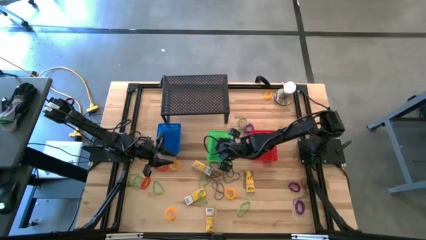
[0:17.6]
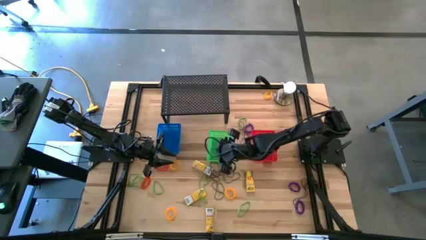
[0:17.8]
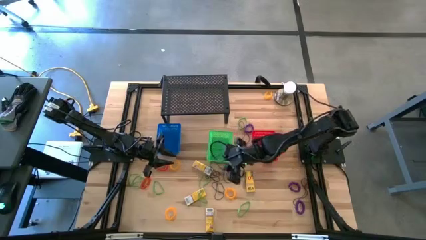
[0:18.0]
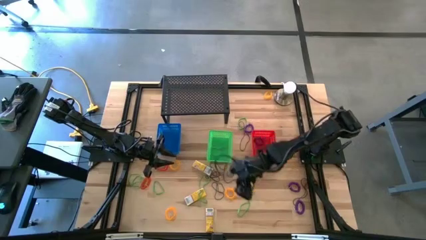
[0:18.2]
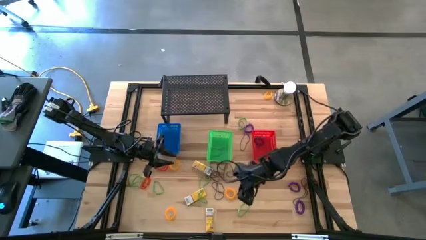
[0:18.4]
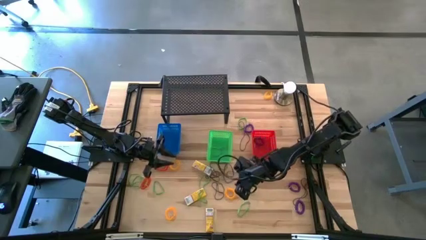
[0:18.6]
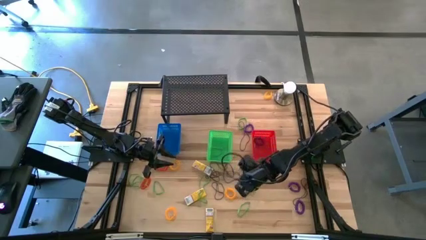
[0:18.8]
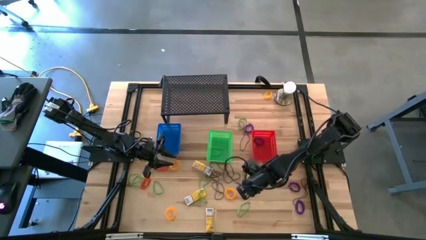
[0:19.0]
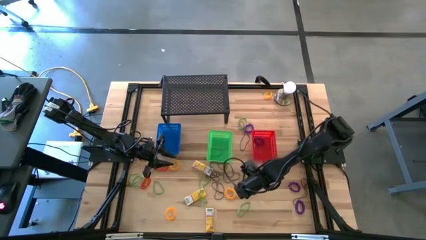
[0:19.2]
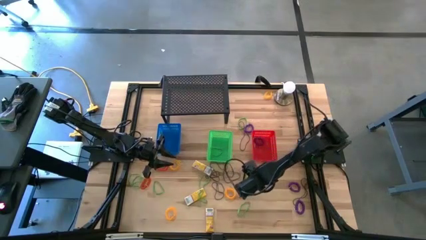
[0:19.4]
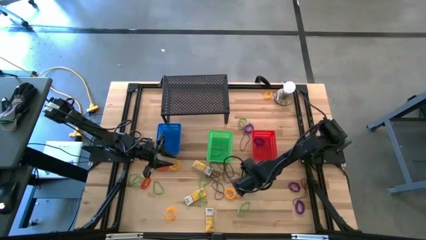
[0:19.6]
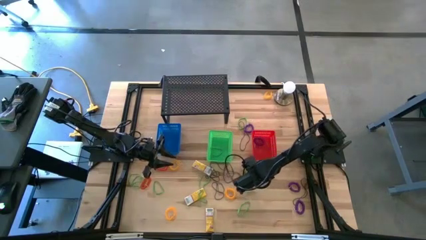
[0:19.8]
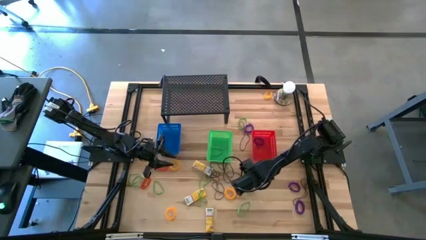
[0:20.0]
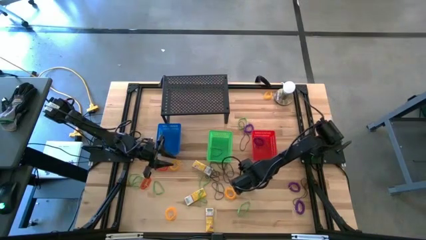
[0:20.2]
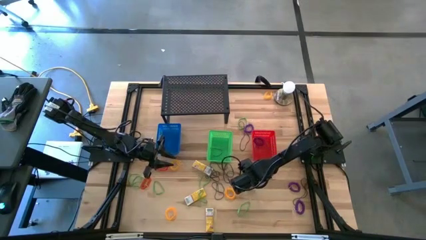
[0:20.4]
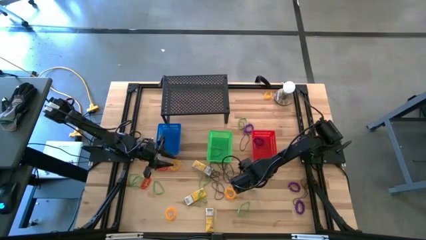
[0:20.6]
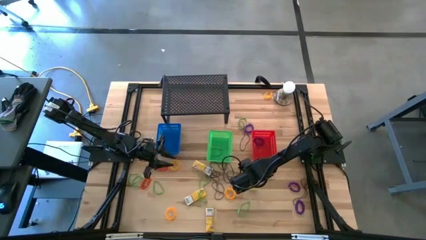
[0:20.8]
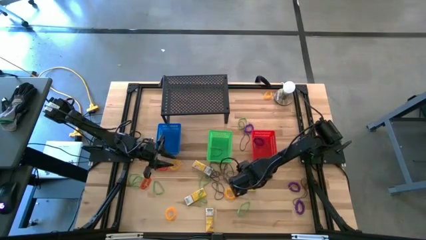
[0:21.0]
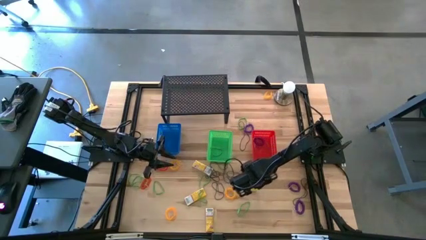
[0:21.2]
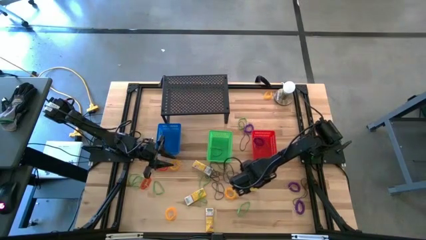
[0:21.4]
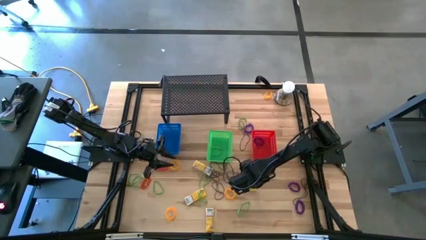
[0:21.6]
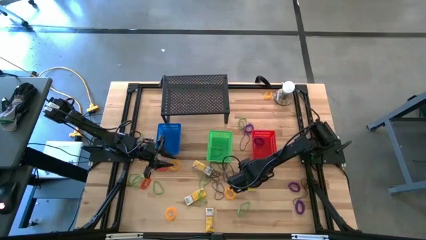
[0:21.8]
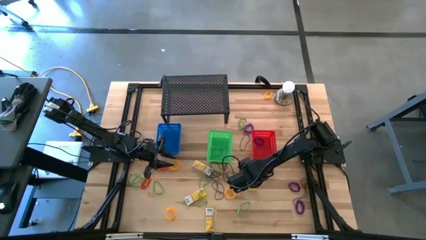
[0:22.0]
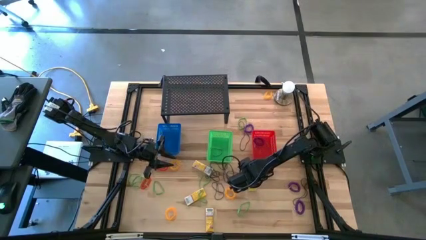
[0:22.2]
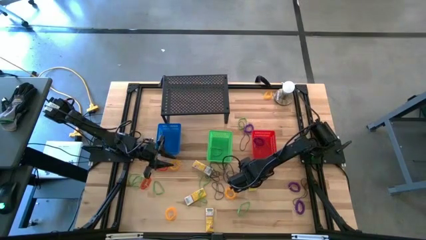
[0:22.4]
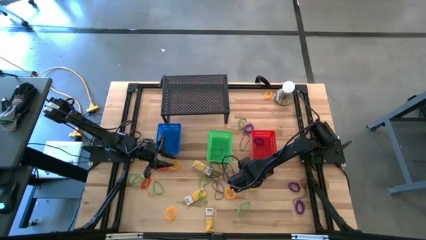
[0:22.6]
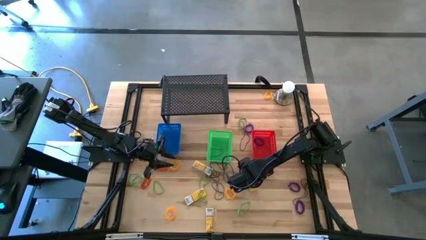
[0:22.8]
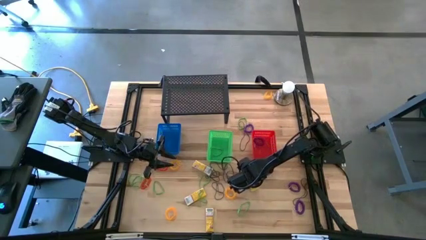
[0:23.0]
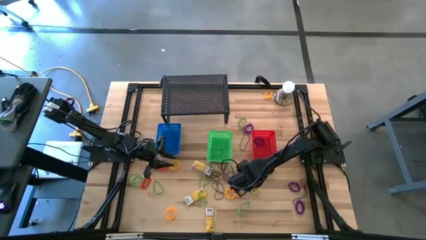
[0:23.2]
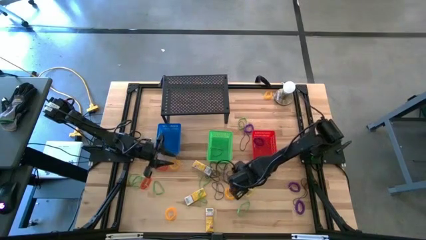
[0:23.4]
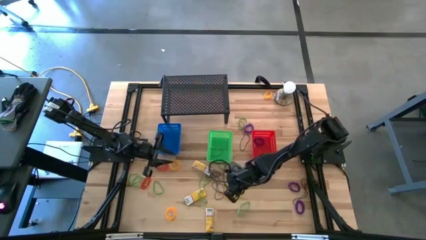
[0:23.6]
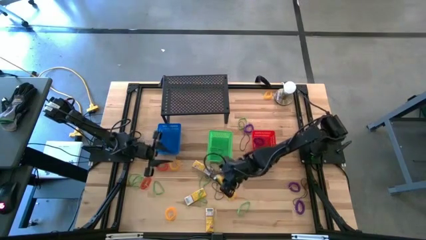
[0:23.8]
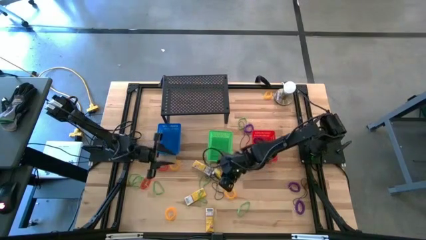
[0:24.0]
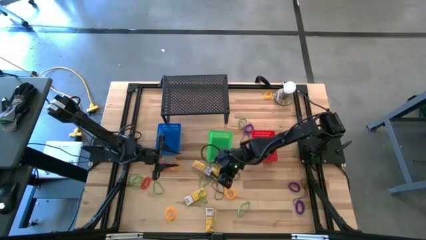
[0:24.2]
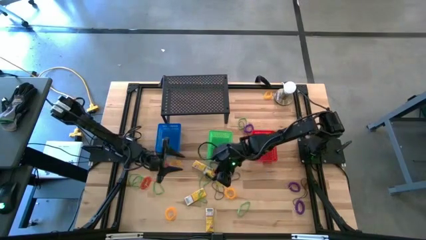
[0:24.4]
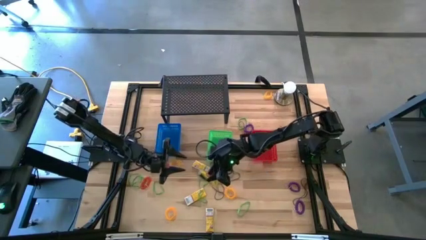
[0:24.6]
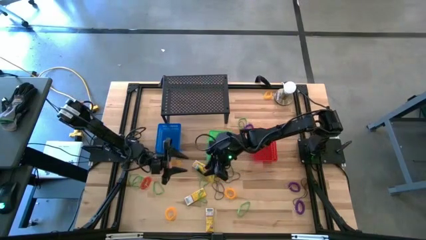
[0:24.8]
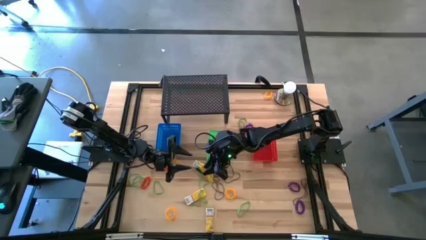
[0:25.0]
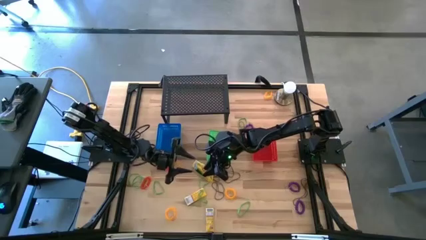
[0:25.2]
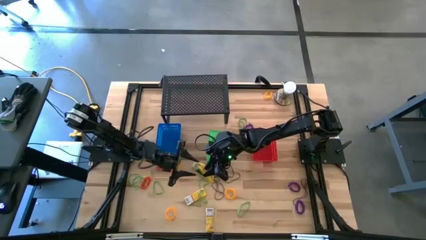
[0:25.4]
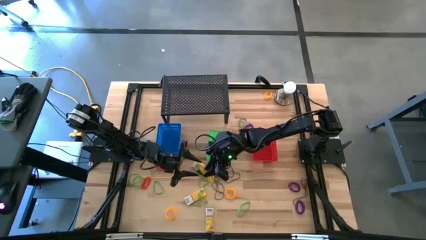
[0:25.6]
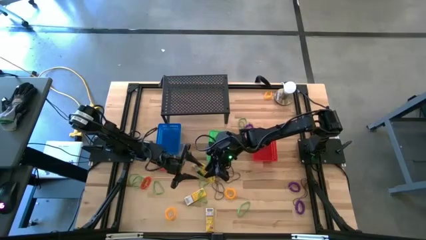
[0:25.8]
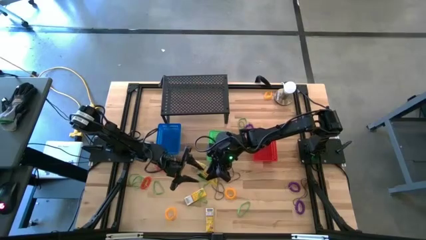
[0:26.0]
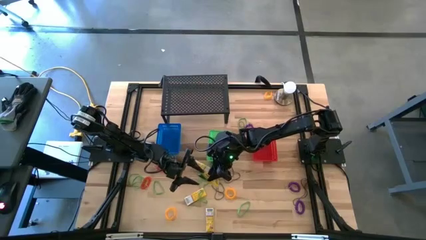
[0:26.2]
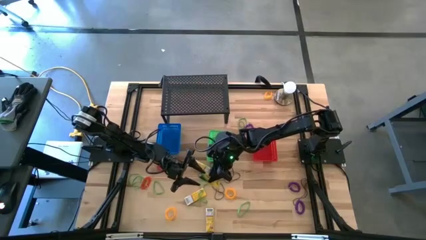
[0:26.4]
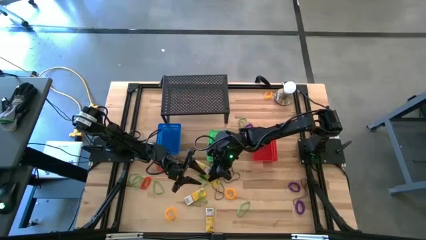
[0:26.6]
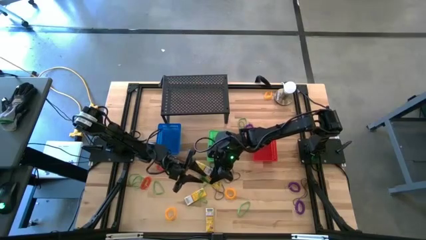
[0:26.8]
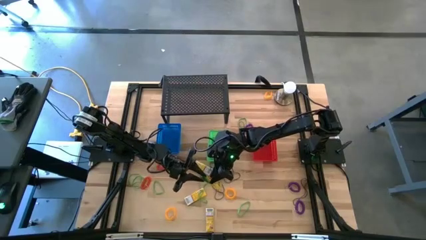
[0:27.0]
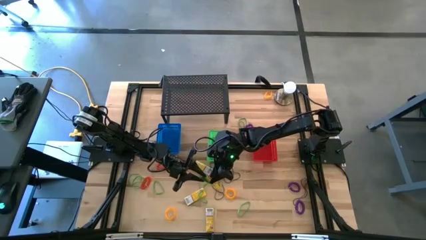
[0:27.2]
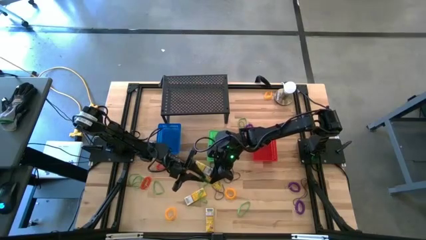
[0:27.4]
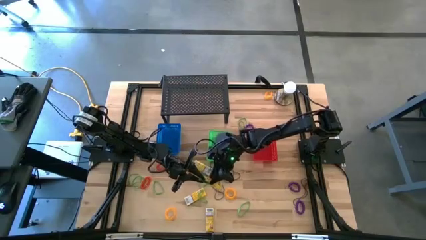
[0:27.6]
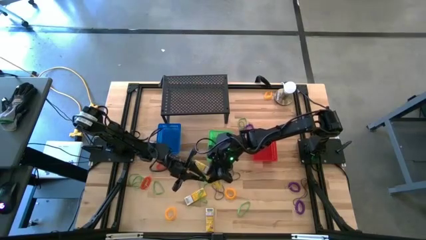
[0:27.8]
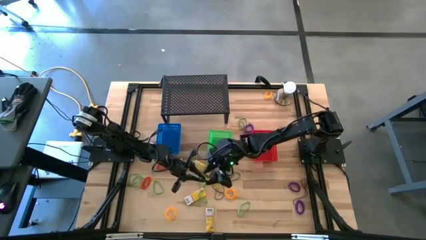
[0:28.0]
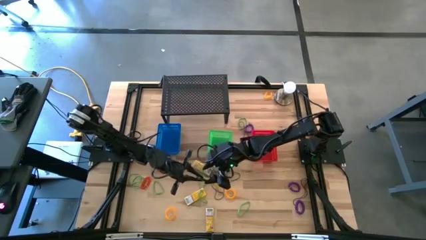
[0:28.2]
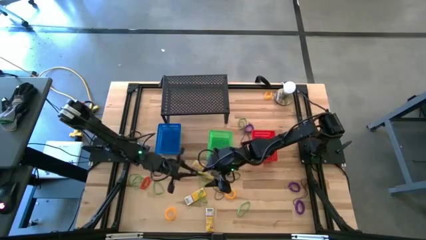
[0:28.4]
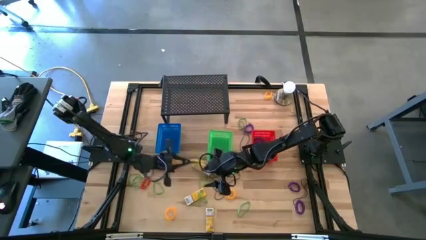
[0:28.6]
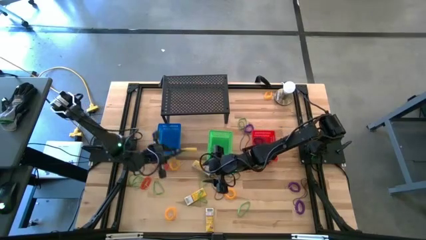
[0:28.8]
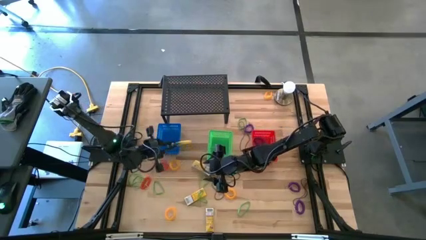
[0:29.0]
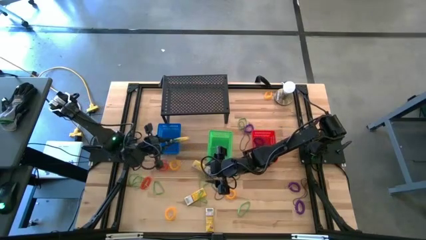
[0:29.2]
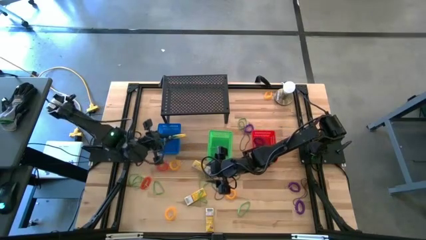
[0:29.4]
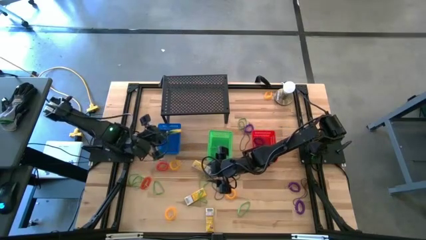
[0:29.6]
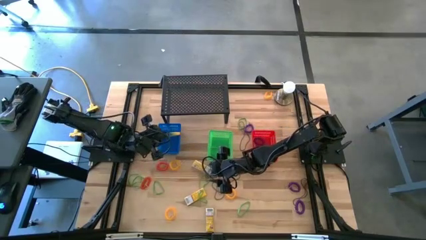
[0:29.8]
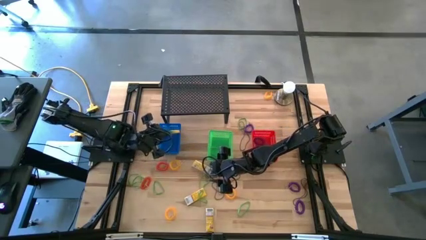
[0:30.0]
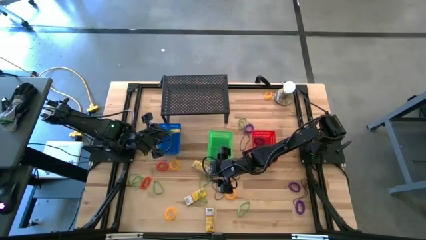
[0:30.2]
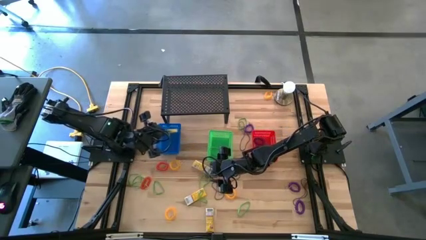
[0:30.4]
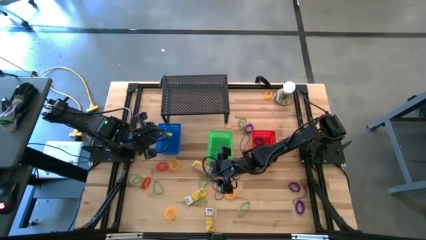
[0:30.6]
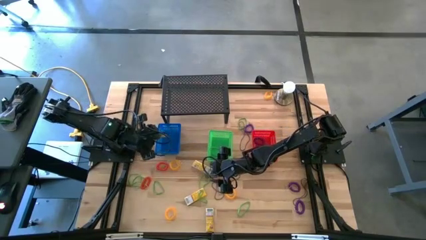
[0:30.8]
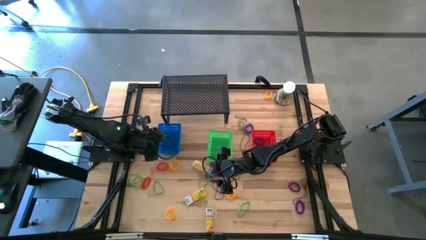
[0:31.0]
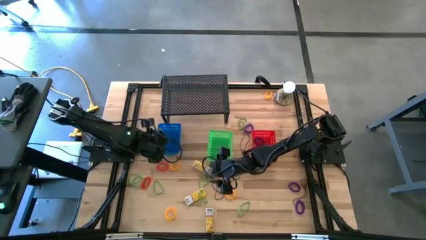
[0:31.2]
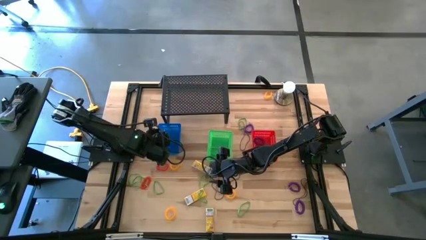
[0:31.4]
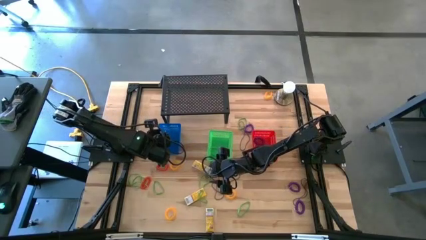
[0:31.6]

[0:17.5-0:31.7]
Task: Pick & Place Office Desk Supplies
Put the crayon box into the blue bin

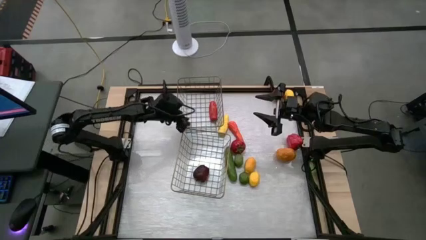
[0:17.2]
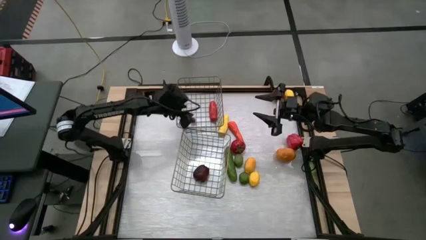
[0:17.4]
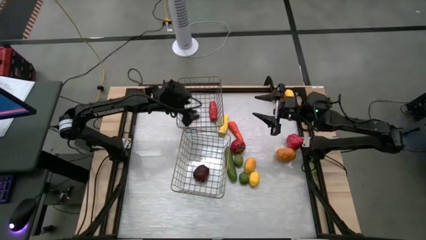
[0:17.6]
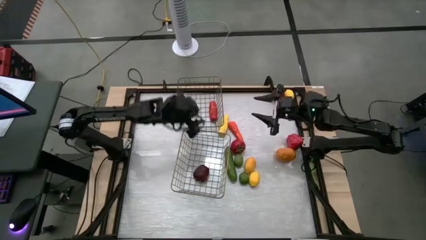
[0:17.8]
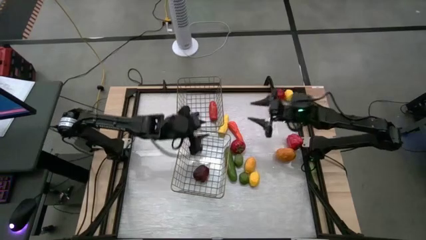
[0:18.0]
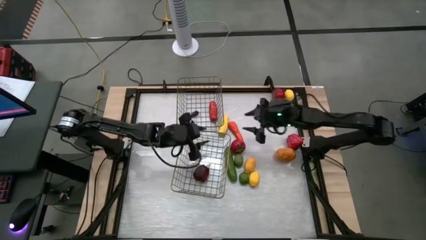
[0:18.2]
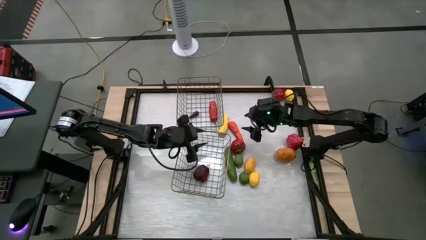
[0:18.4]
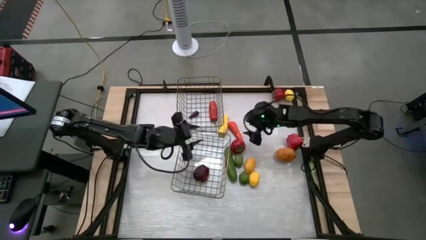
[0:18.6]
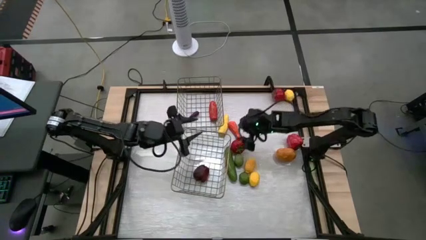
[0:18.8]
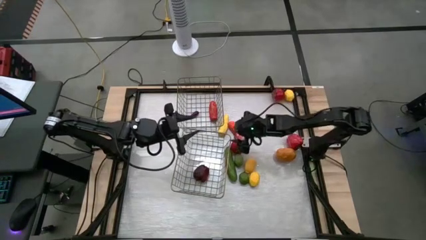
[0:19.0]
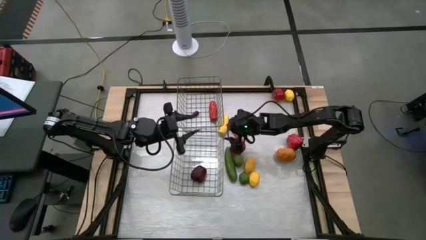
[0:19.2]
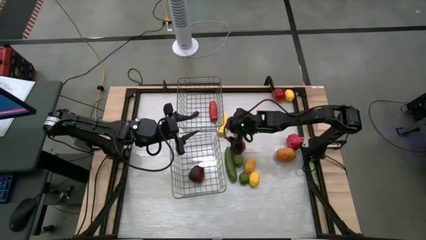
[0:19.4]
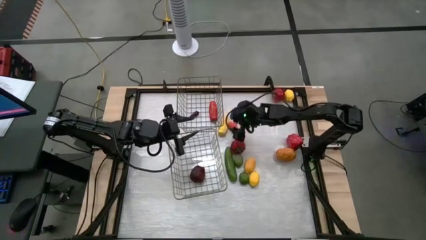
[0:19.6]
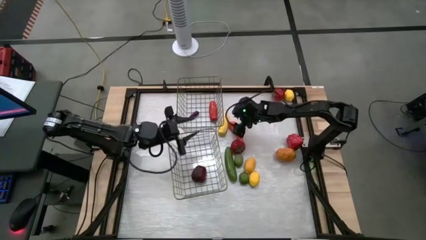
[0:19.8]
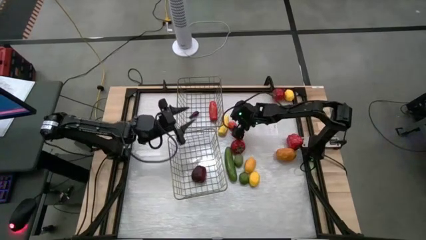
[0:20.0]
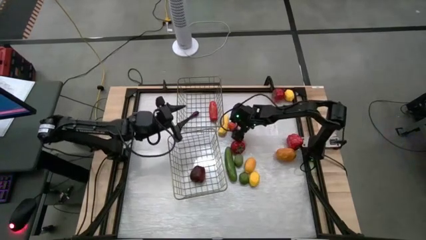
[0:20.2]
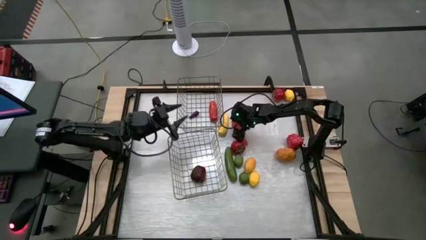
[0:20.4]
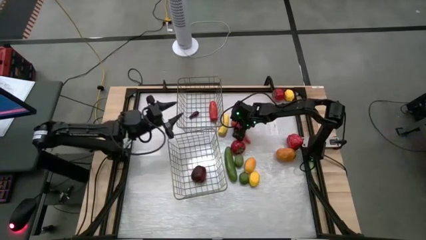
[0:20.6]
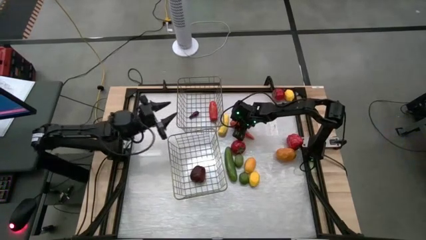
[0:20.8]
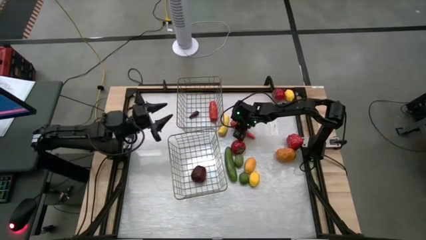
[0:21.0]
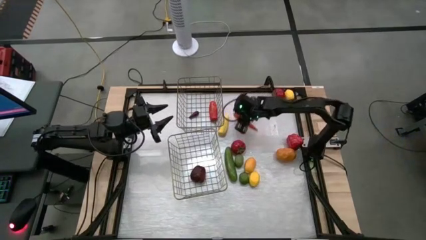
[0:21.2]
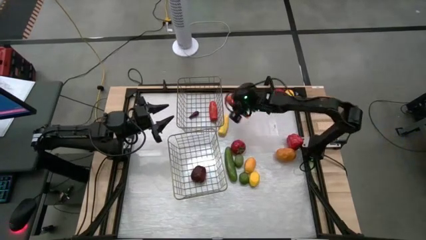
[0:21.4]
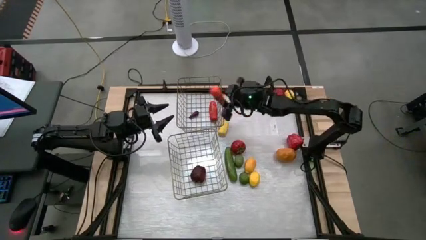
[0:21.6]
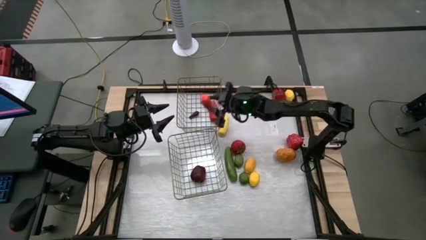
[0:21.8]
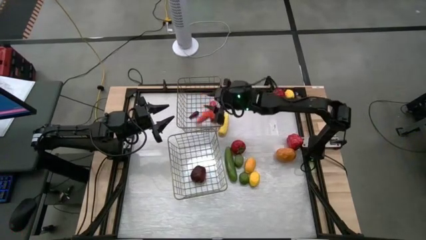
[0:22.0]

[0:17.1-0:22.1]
Task: Sort produce into baskets
Put the orange carrots into the top basket
